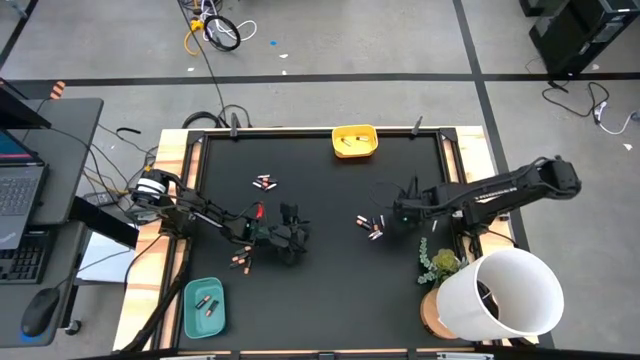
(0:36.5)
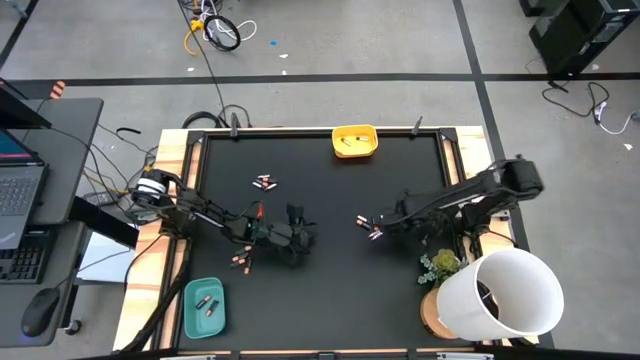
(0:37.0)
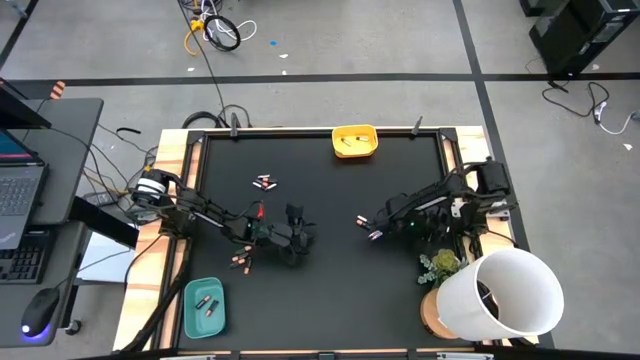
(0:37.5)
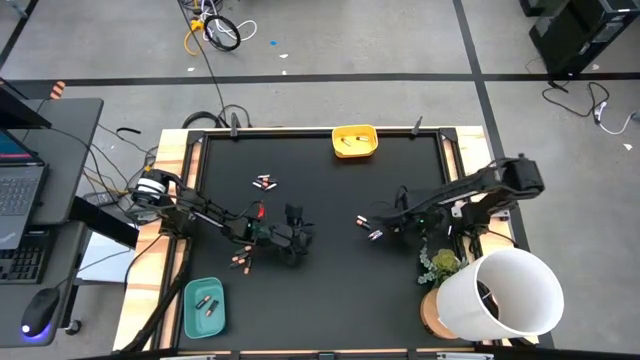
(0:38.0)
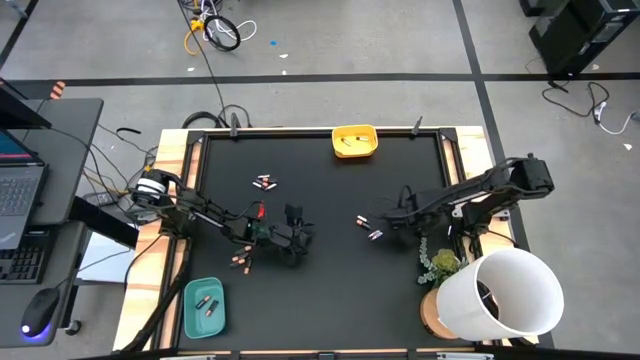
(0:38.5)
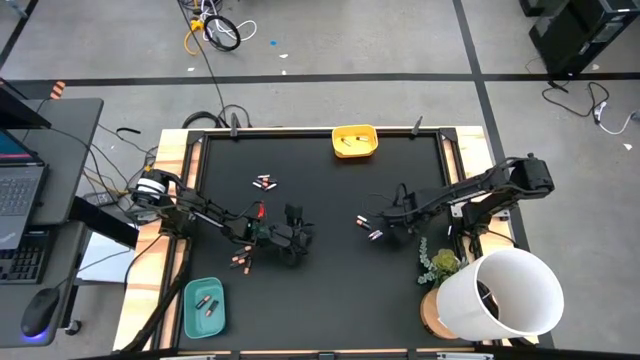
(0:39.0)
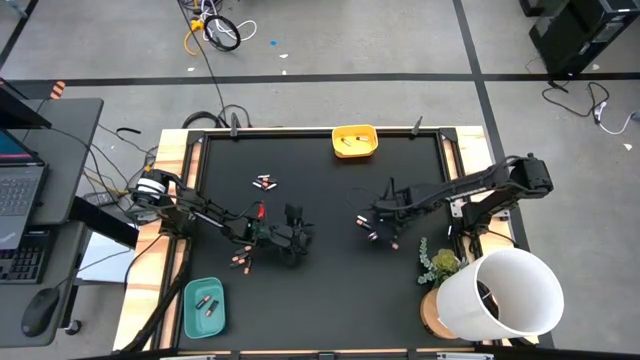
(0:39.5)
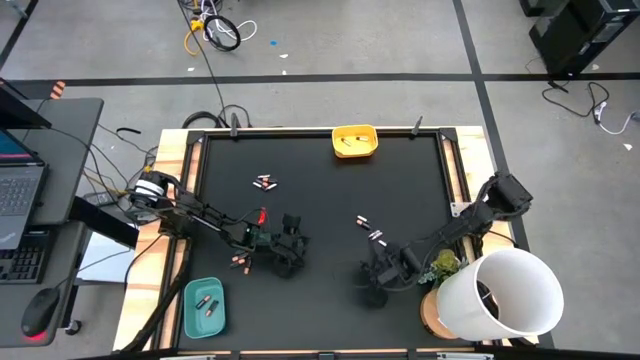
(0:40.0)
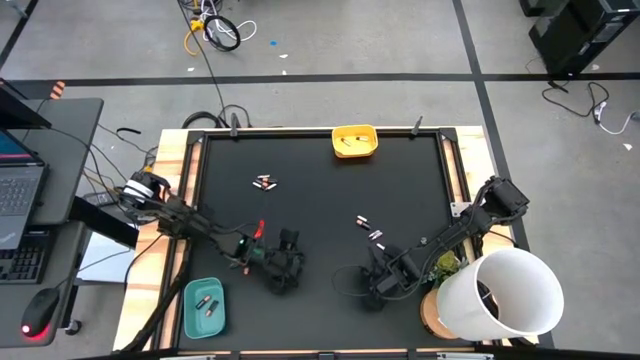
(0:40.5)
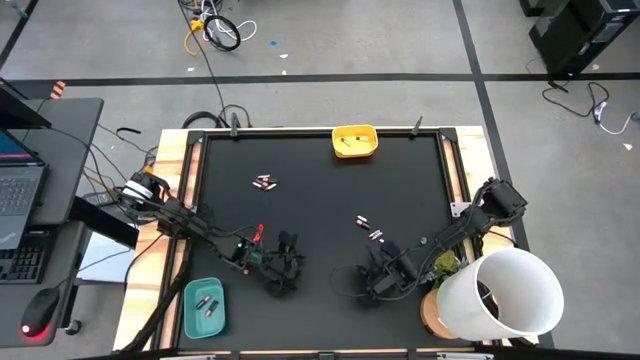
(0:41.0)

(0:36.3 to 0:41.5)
Task: Sort batteries
Adjust the batteries

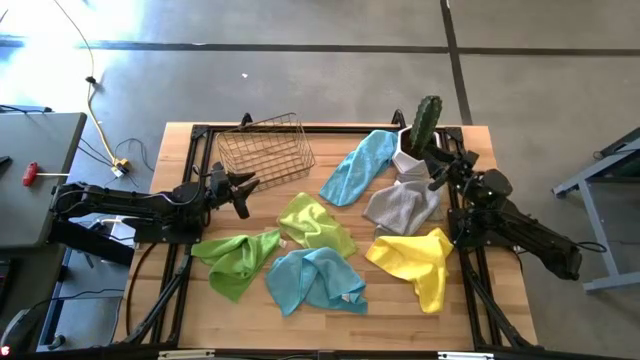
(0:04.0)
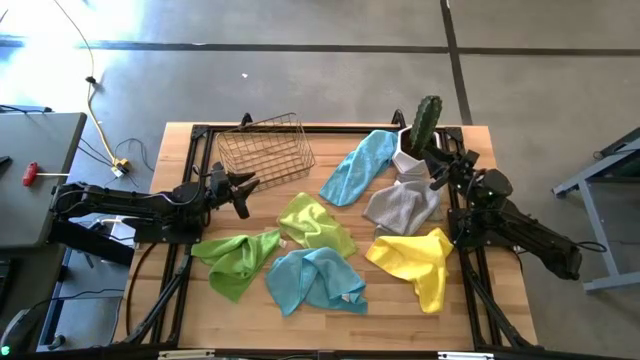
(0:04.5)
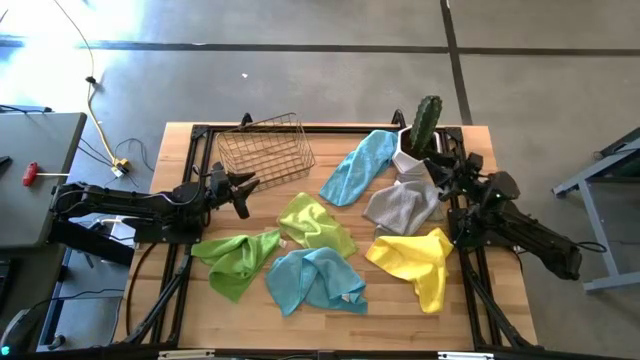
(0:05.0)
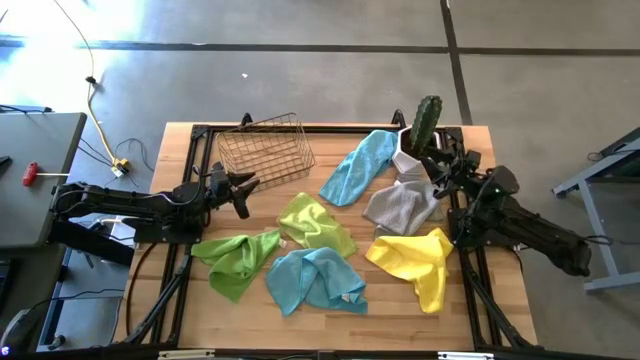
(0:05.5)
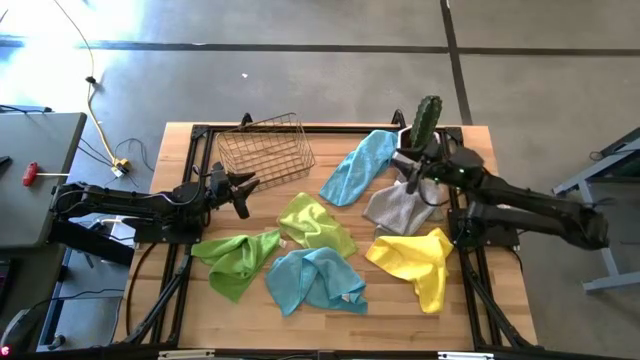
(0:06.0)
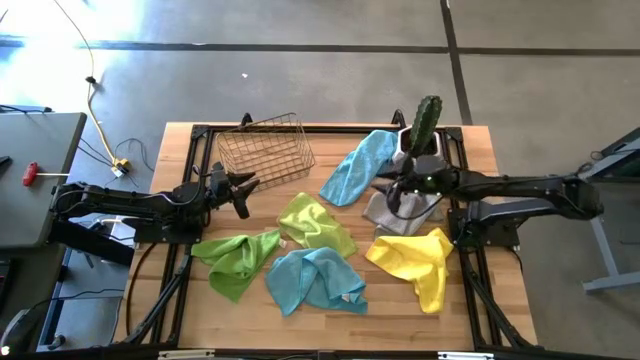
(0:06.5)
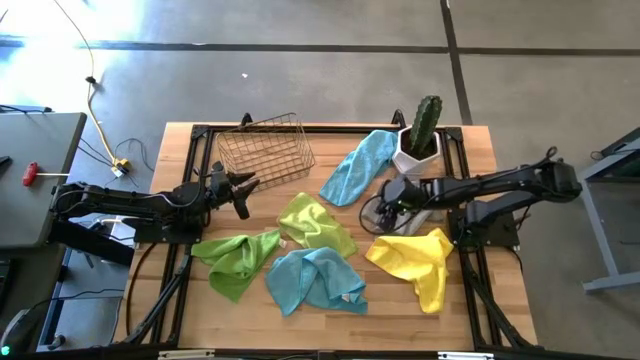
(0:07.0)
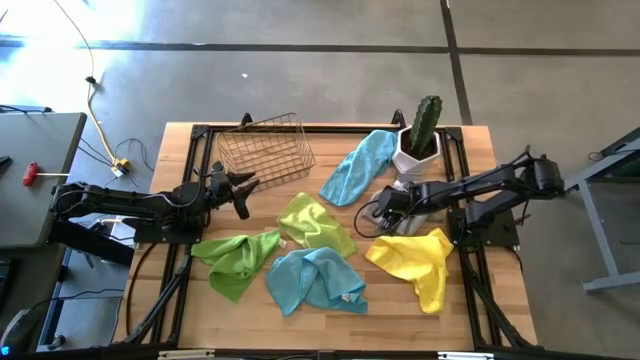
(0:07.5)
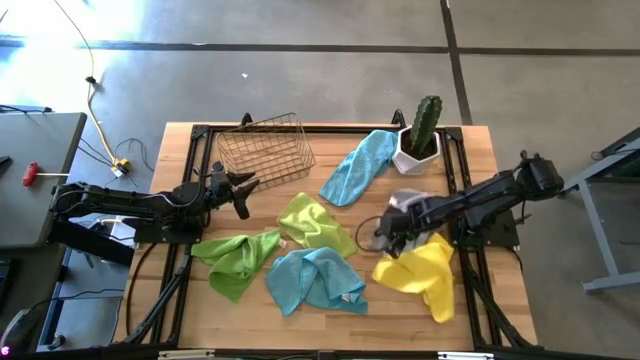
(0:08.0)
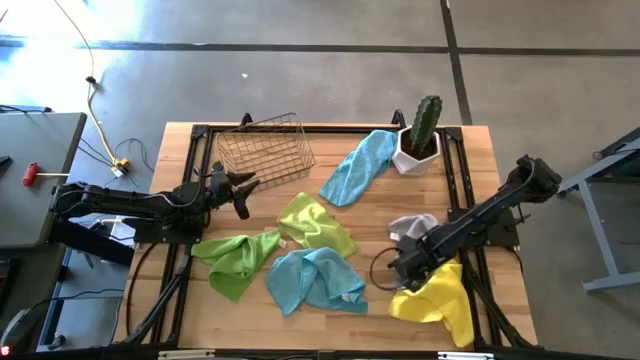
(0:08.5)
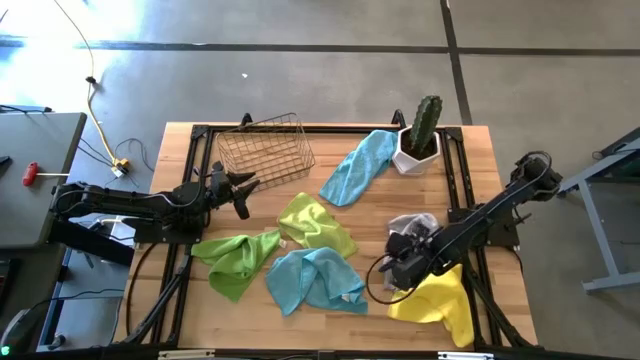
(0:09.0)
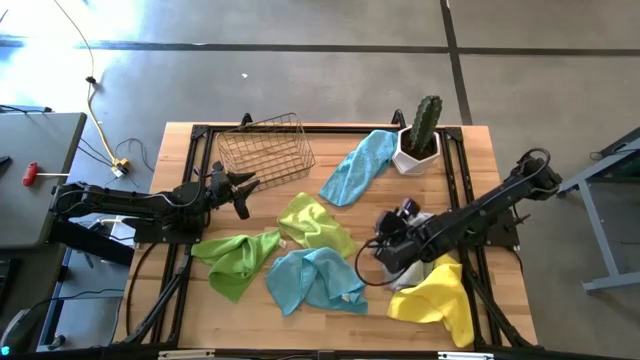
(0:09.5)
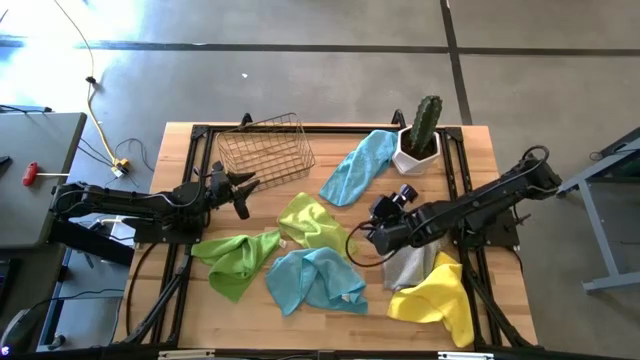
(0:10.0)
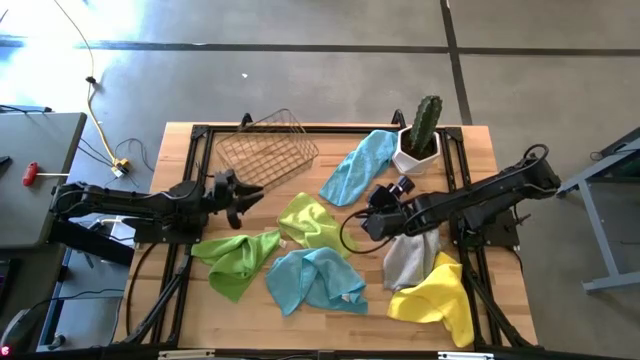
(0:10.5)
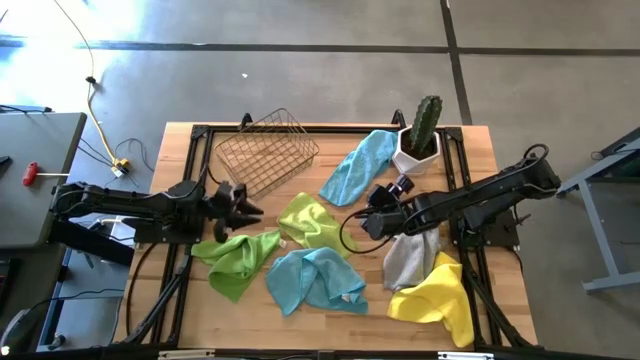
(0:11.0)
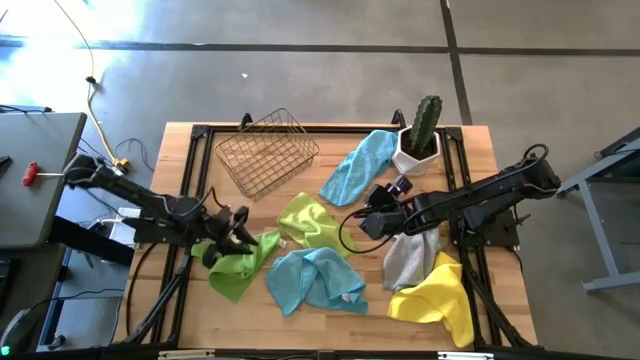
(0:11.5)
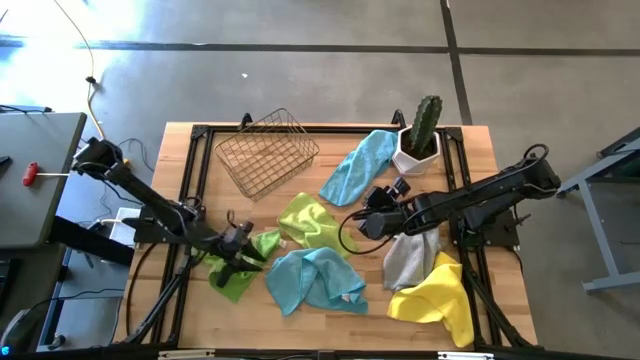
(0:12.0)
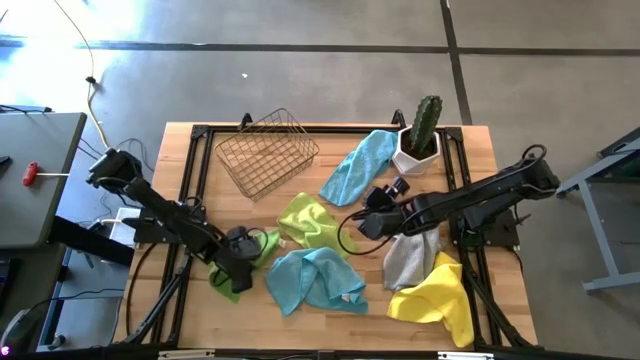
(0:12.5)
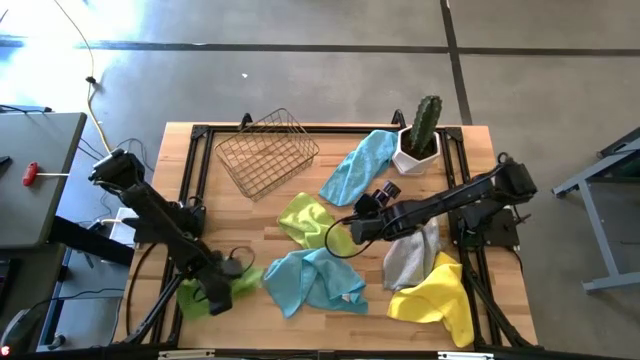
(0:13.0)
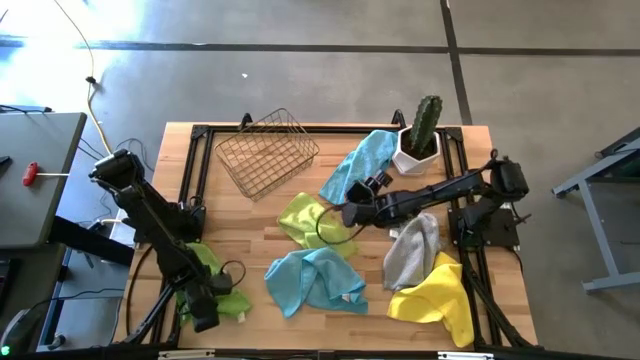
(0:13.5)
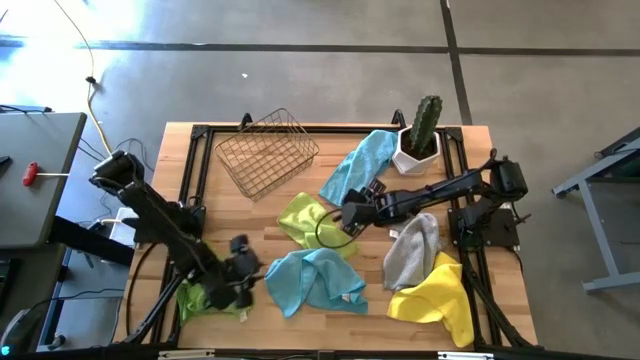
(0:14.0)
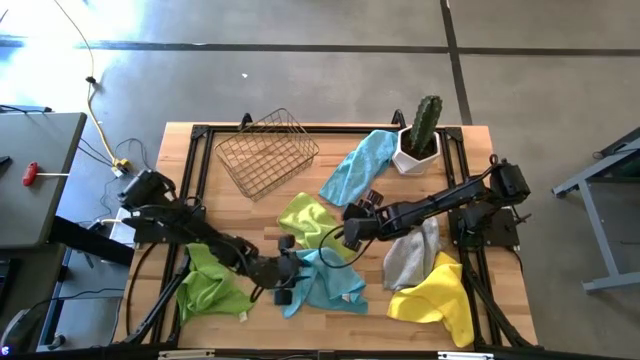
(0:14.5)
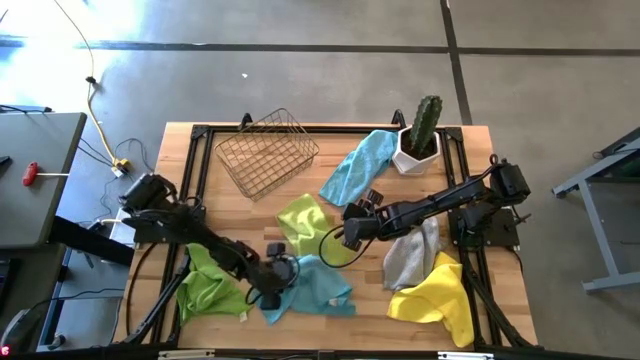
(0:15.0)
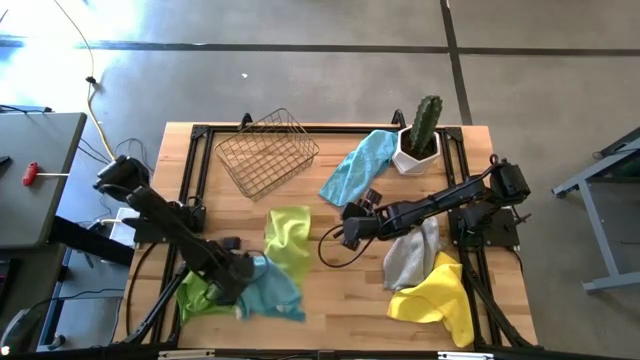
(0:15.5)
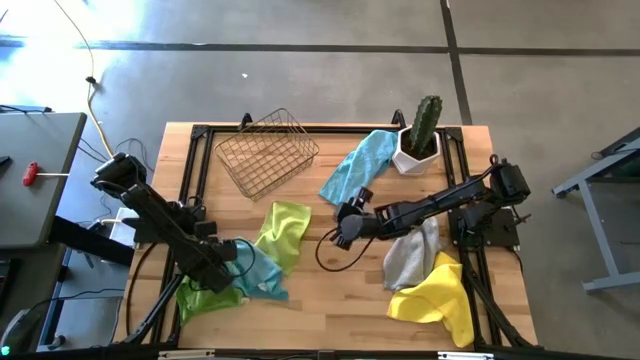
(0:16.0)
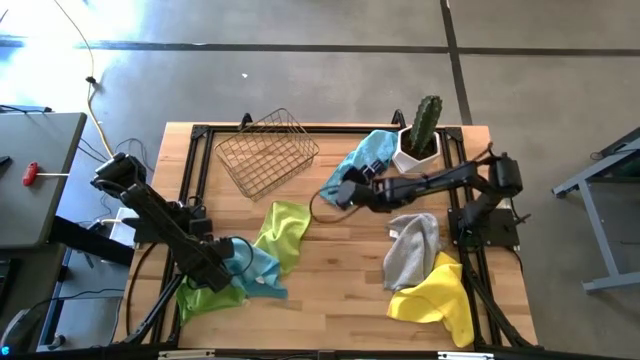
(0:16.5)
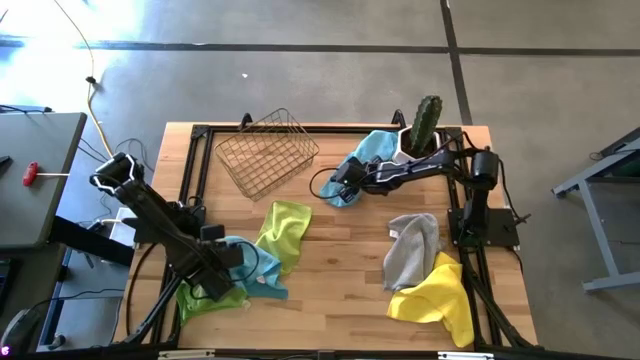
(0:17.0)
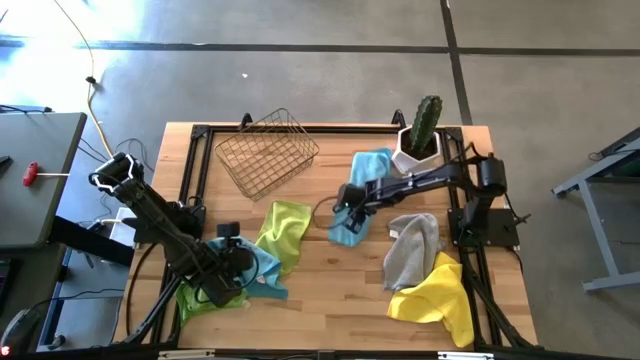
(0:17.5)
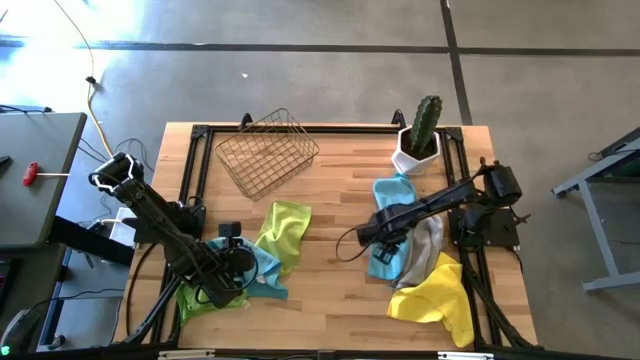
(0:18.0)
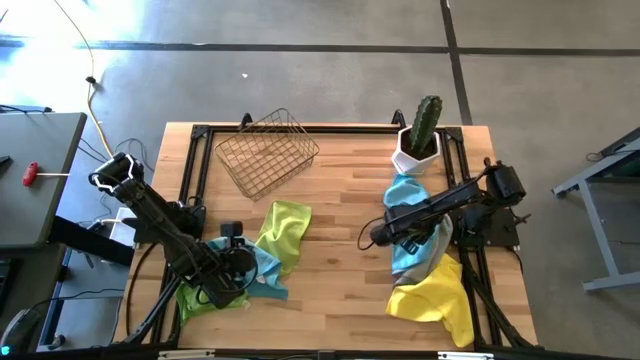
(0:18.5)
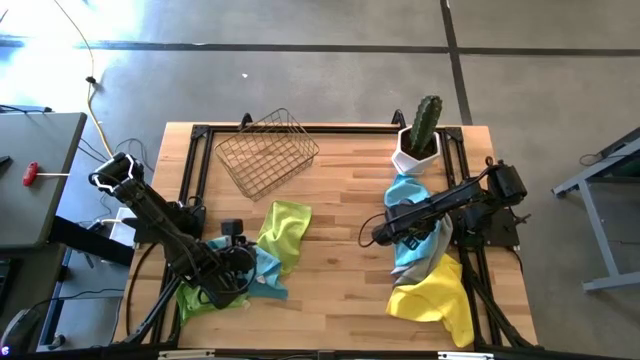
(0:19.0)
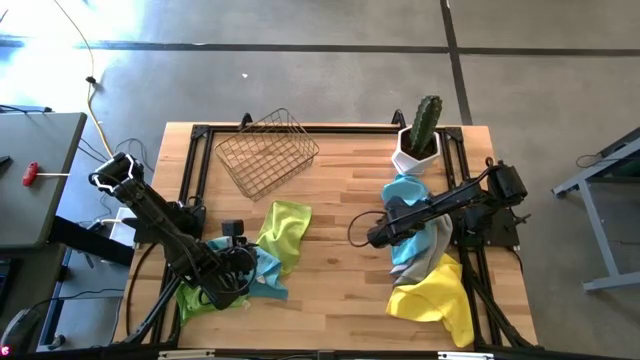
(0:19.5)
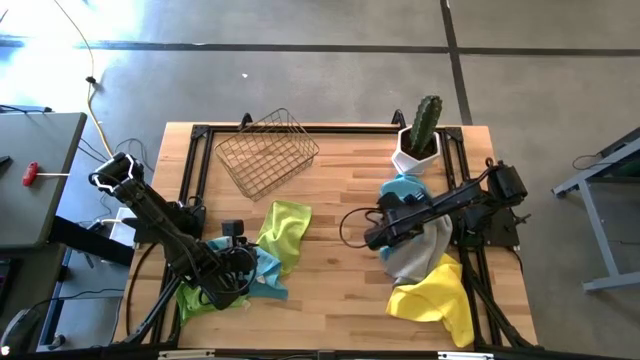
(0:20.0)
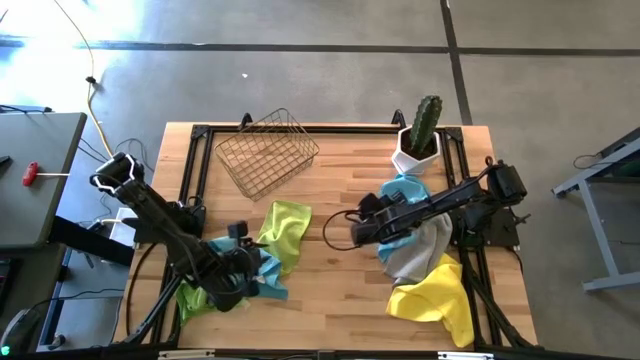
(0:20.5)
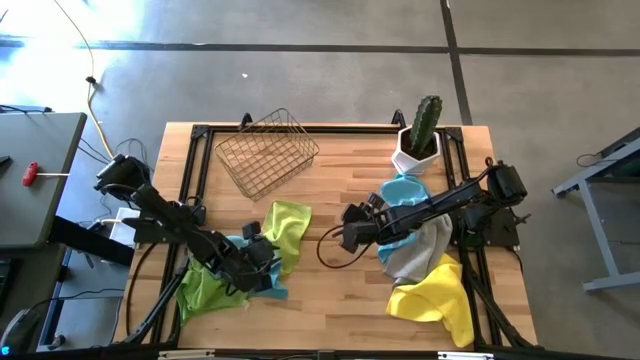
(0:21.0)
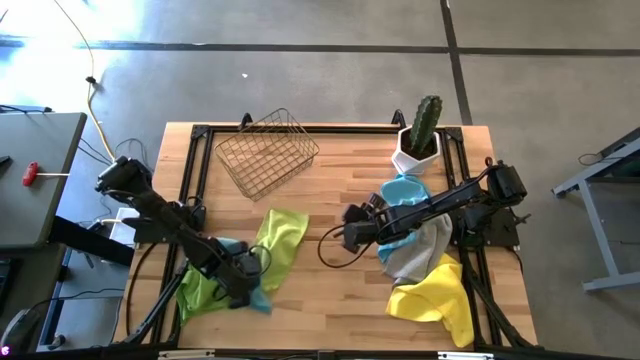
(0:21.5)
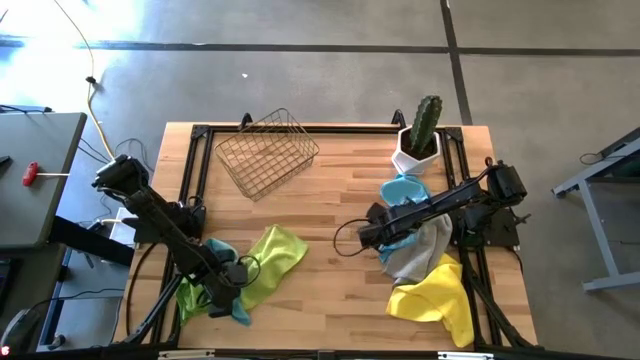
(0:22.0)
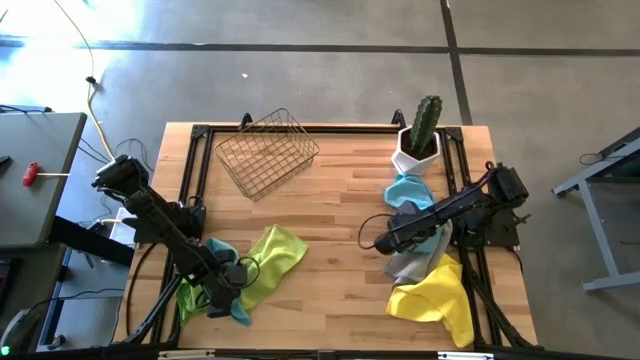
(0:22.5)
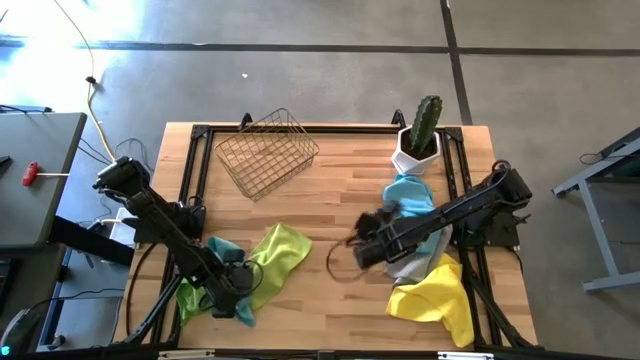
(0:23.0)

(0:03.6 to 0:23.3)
Task: Fold microfiber towels
Prepare the table for folding the microfiber towels
